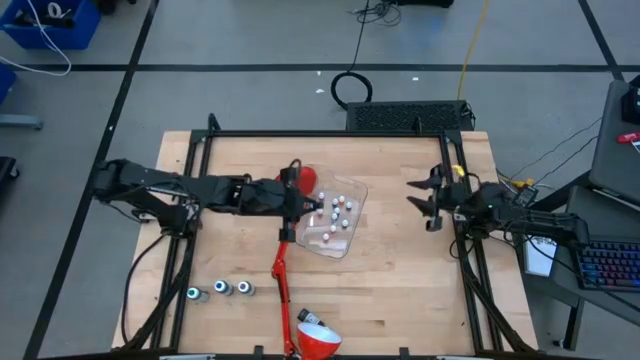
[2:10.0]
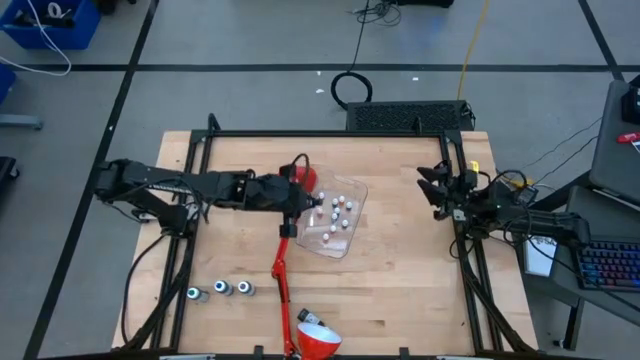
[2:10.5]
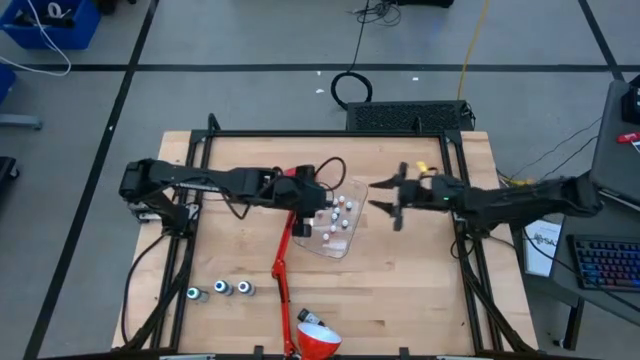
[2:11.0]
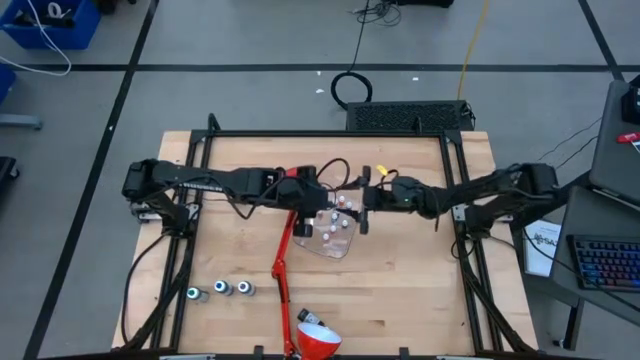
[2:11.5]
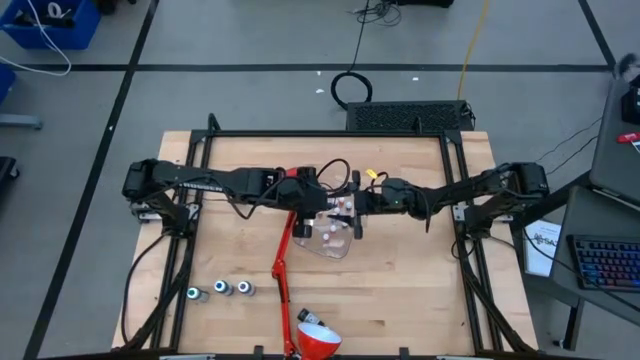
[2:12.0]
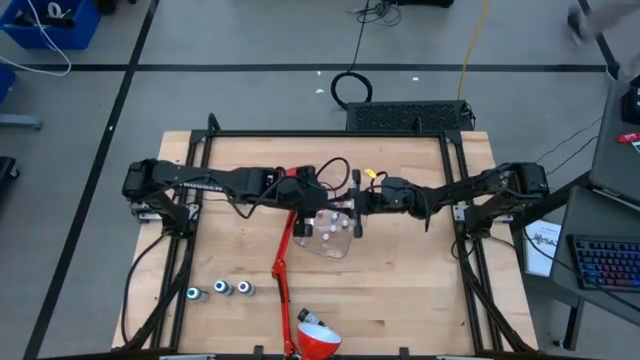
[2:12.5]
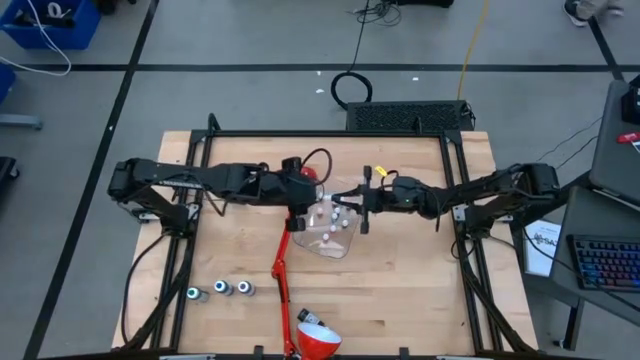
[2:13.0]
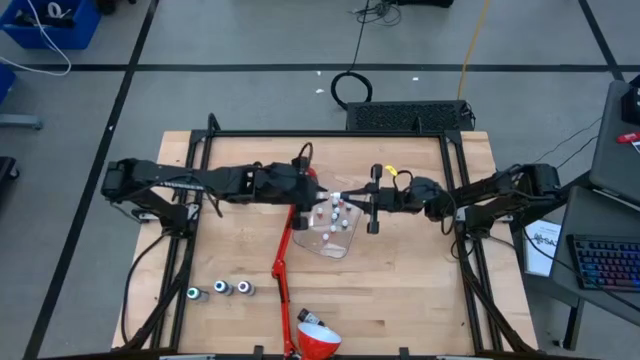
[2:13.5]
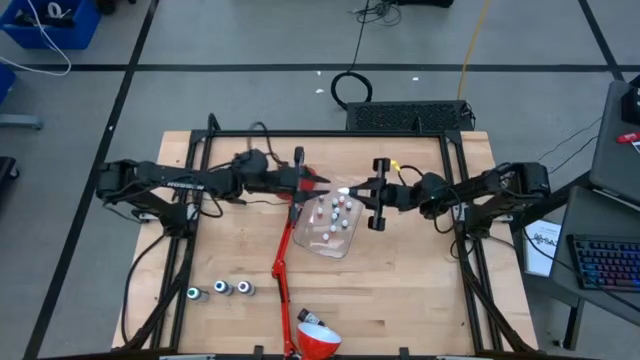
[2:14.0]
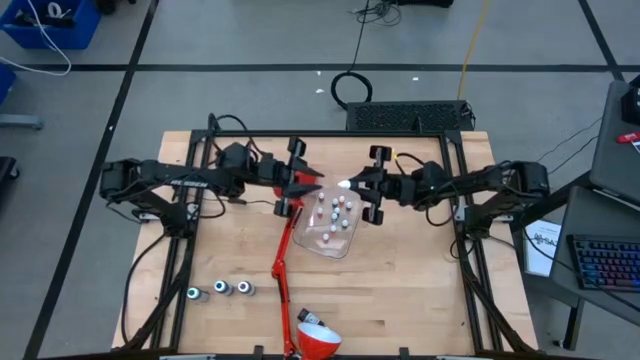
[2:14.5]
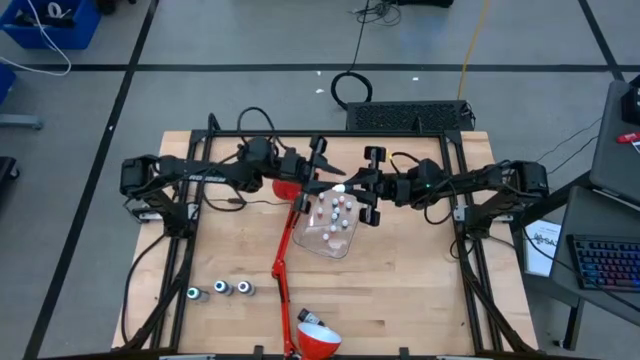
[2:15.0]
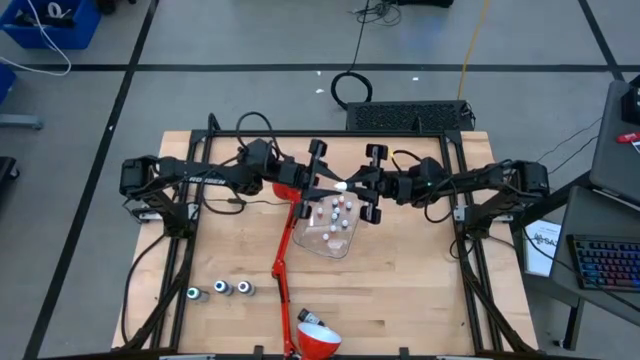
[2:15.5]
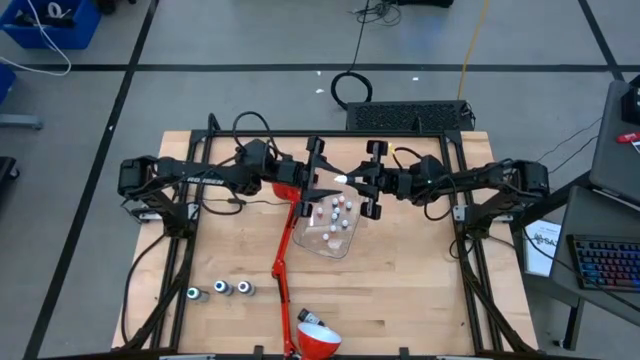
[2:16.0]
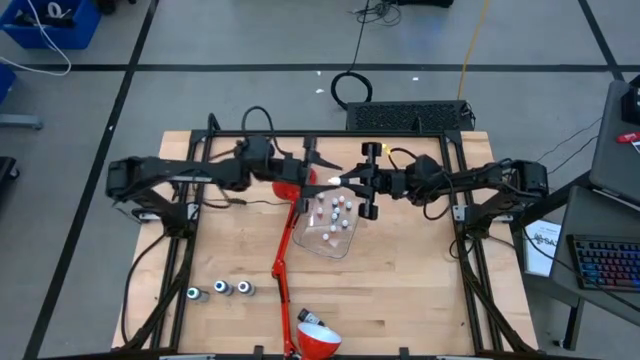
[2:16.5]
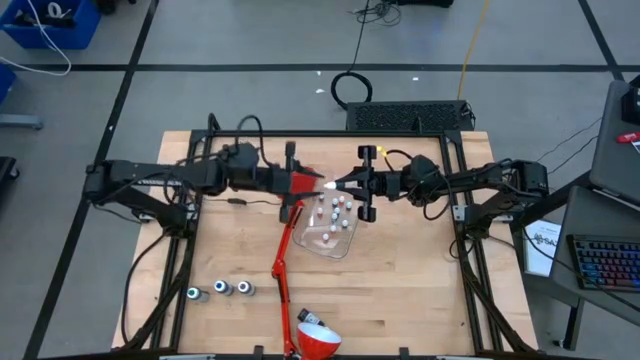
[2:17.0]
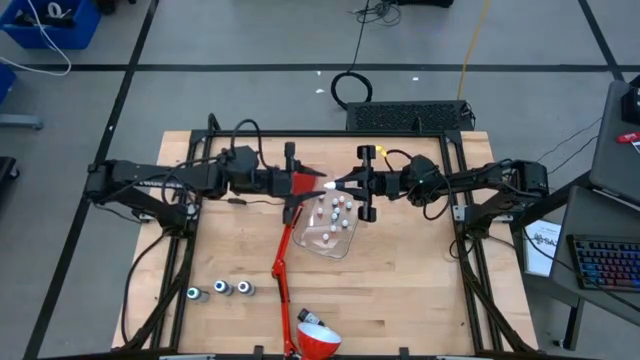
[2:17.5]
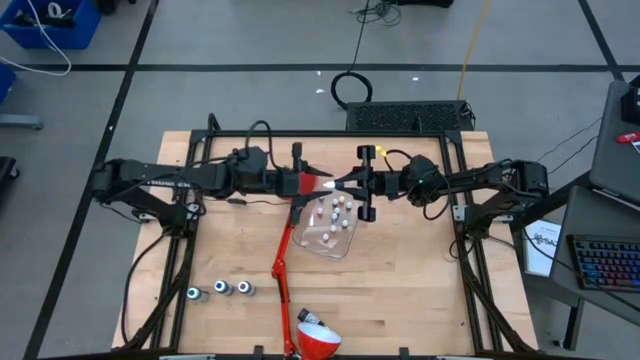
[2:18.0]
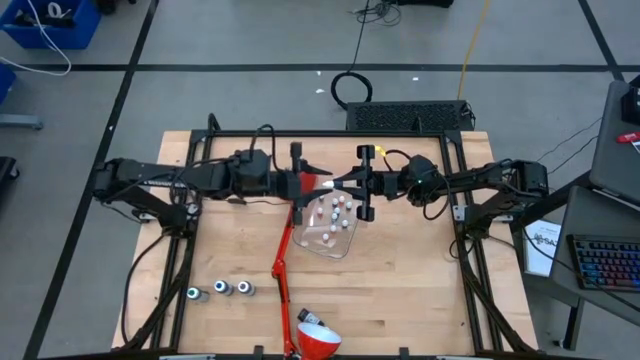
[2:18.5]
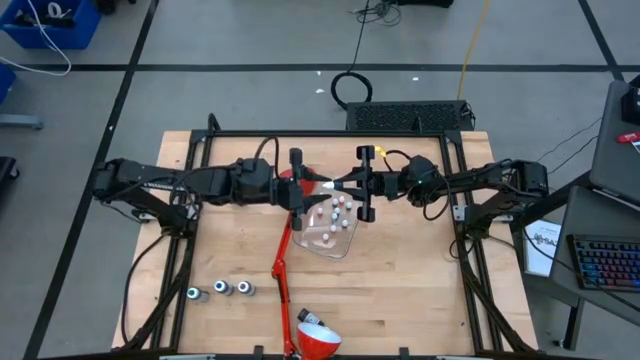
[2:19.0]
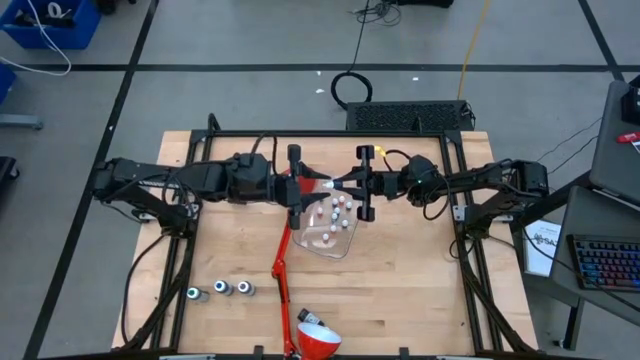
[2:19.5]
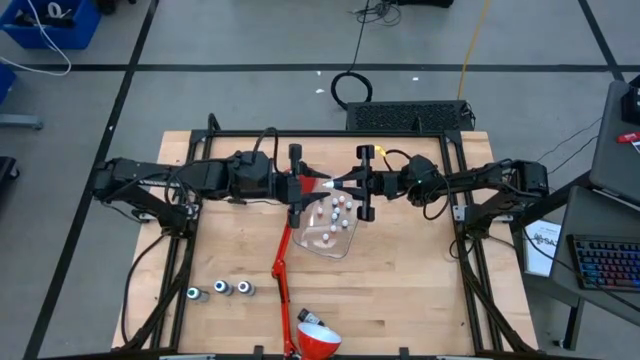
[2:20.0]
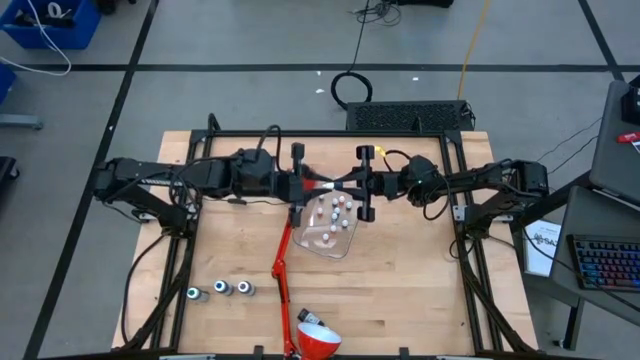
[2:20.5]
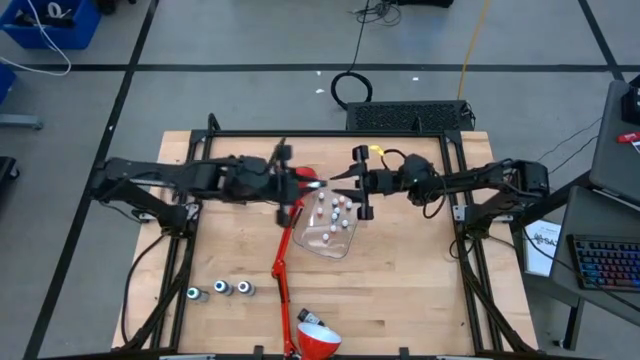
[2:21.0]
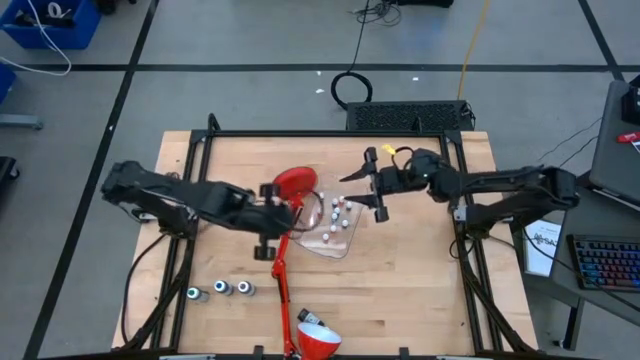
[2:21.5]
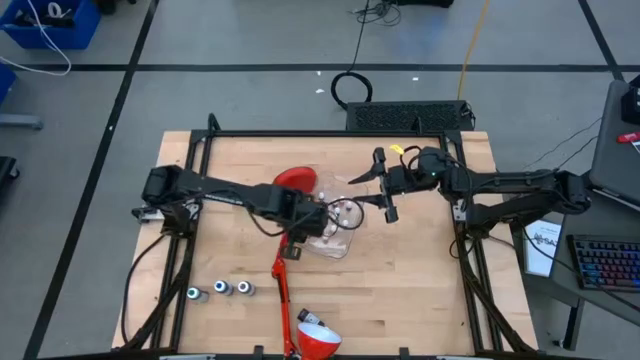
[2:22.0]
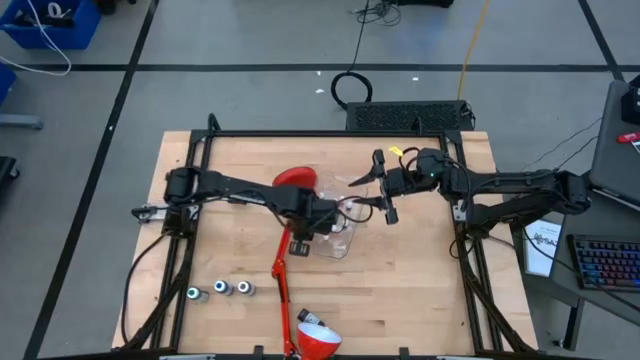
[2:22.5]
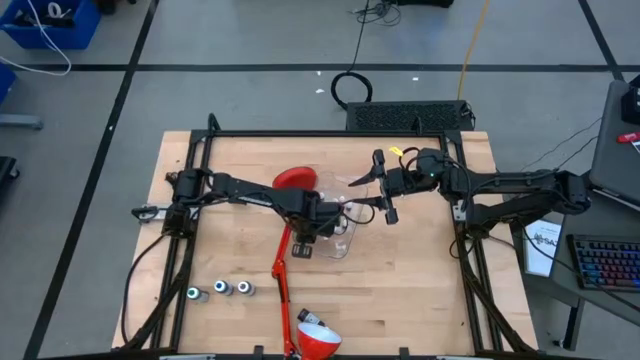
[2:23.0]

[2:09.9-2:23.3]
Task: Pick & Place food coloring
Put the small purple food coloring bottle into the transparent bin

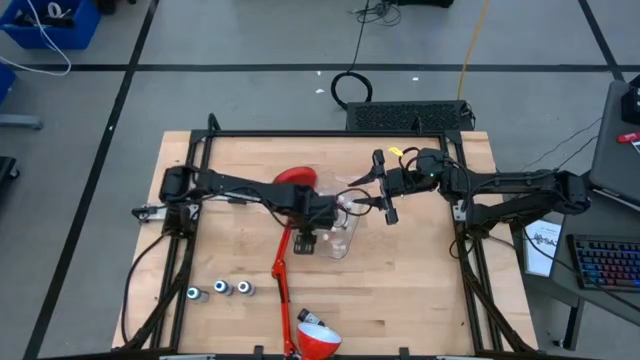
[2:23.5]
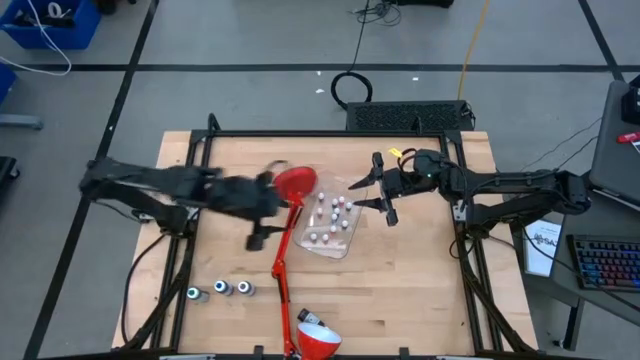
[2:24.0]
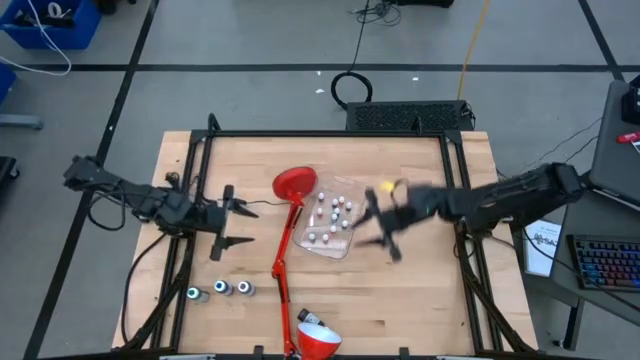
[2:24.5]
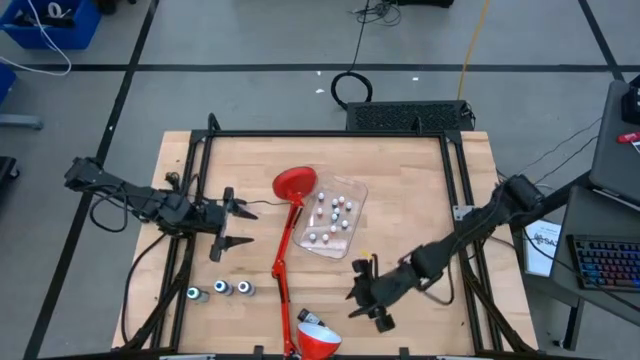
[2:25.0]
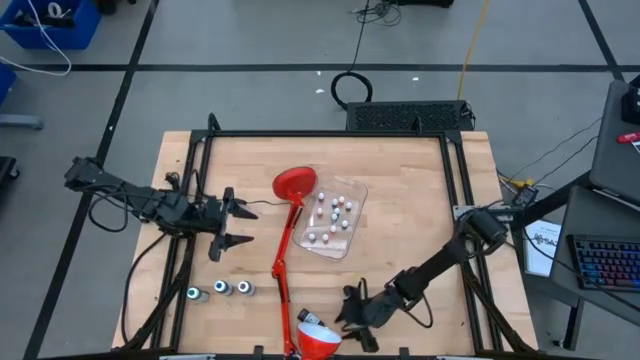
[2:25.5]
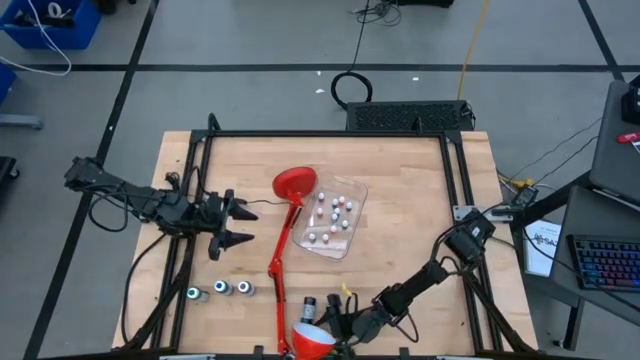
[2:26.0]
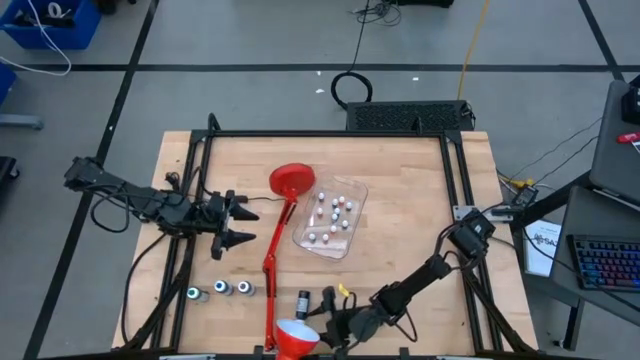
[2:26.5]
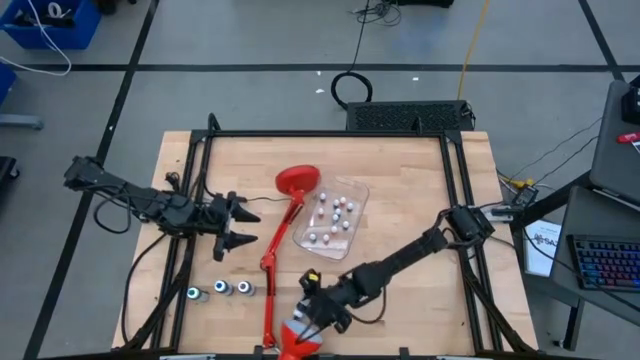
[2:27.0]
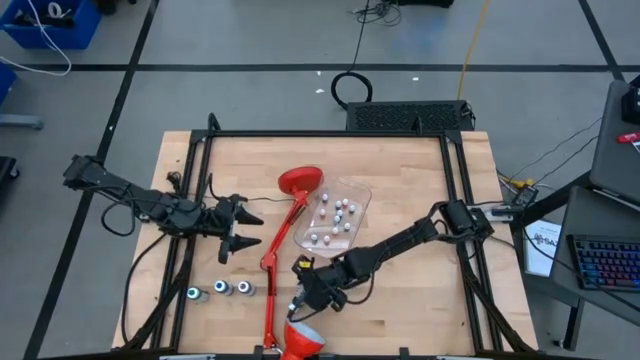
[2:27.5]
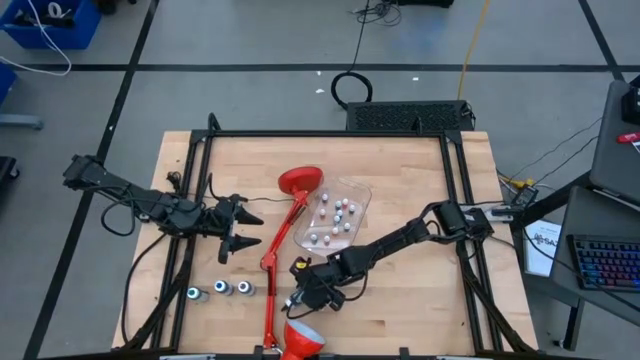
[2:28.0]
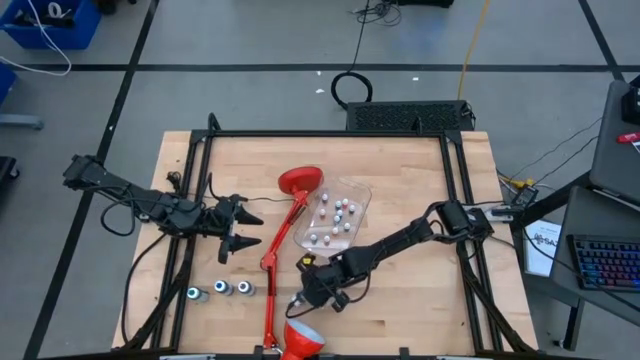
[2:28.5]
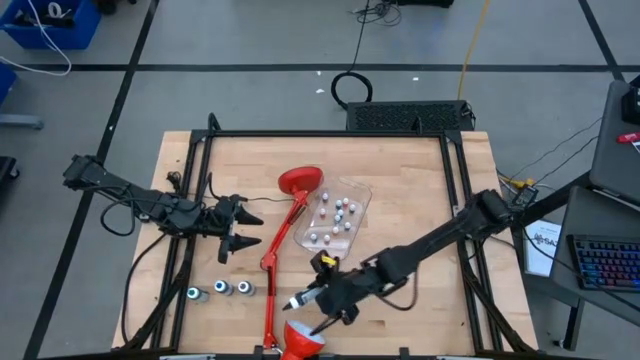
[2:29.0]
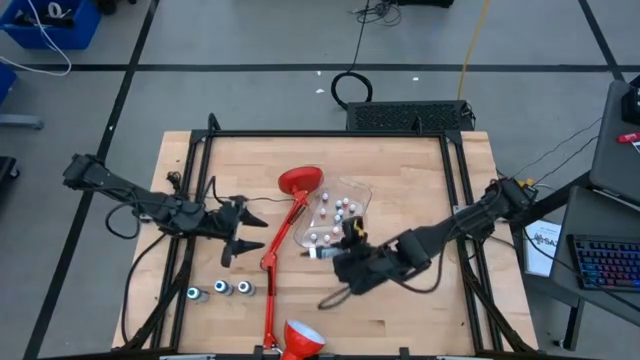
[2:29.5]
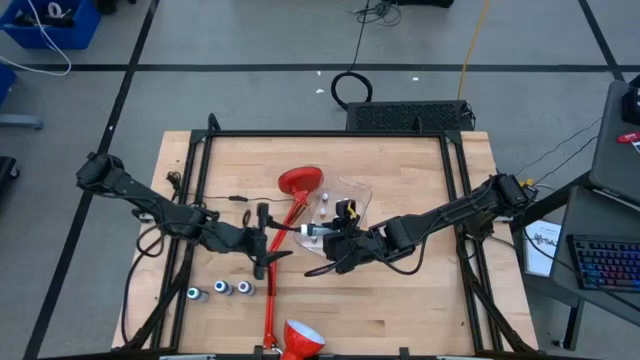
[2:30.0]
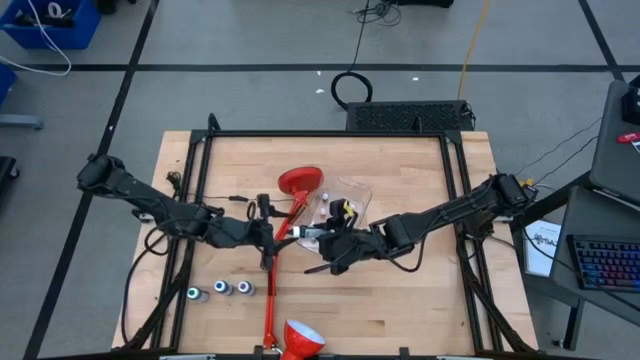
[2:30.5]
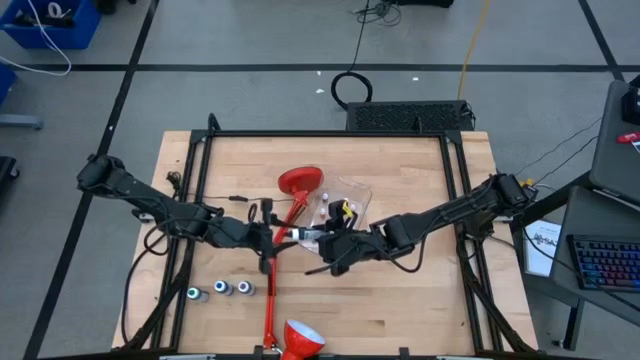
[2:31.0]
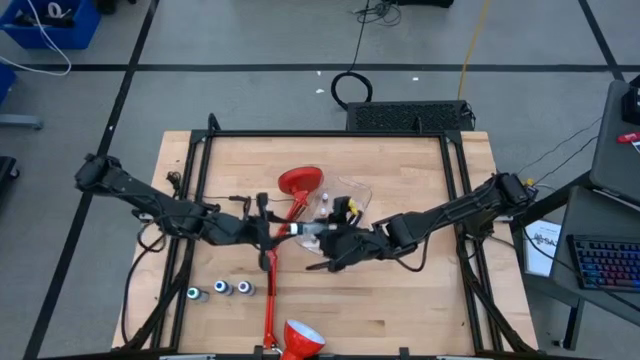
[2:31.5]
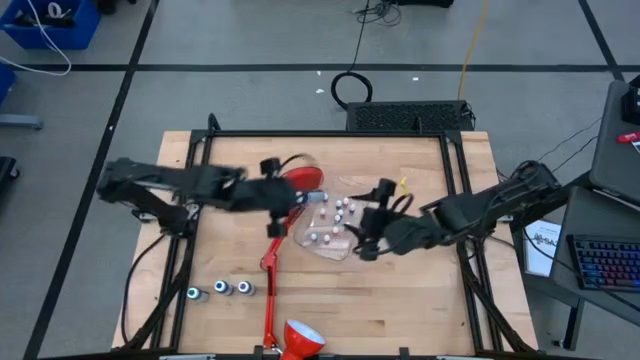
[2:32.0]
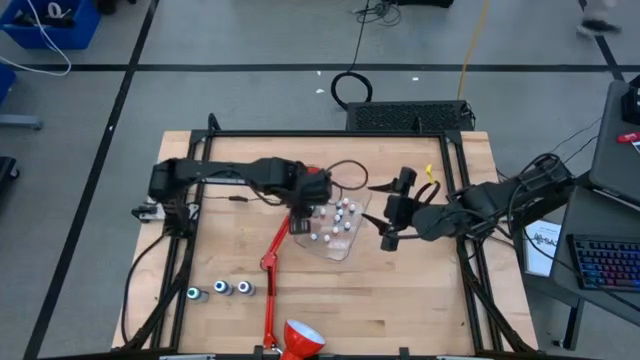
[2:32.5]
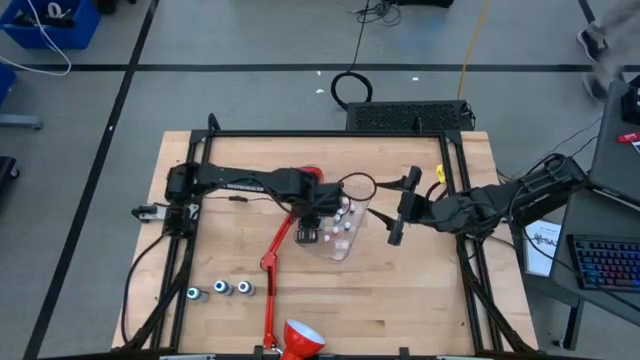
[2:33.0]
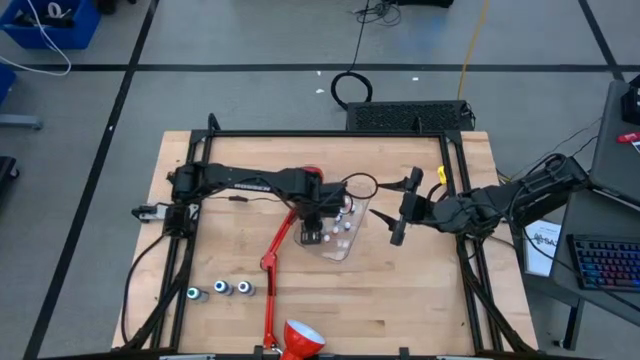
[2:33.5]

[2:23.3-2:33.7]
Put the large black food coloring bottle into the transparent bin
